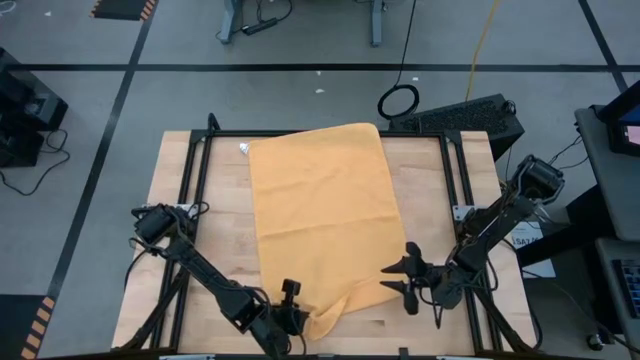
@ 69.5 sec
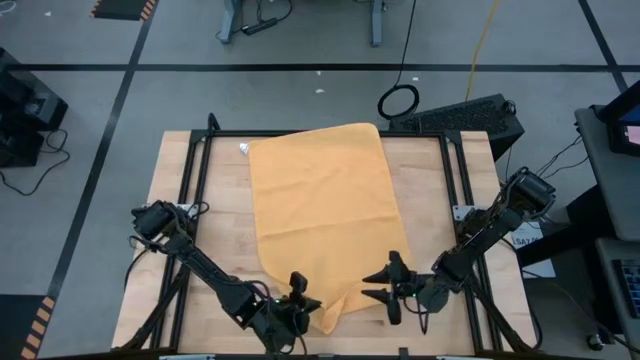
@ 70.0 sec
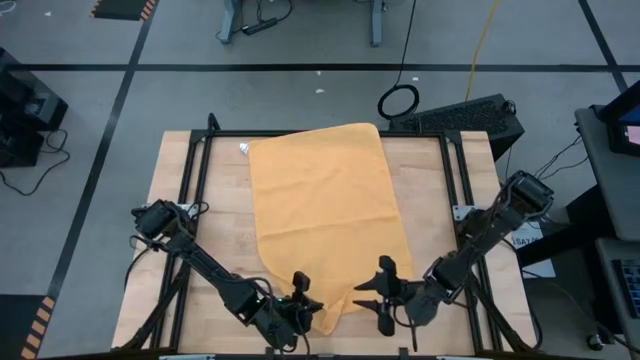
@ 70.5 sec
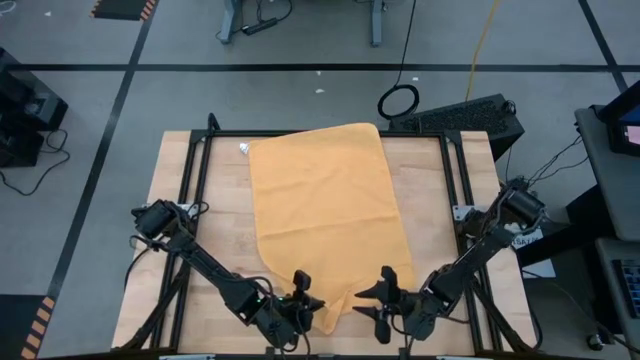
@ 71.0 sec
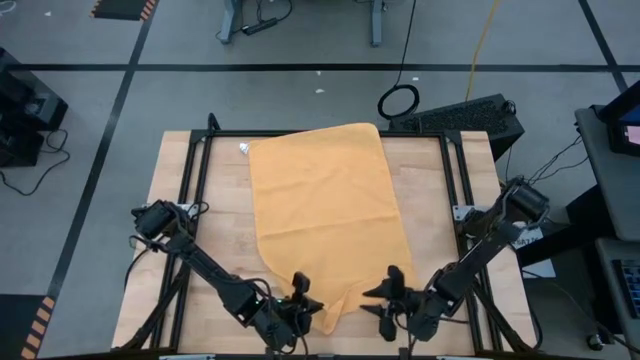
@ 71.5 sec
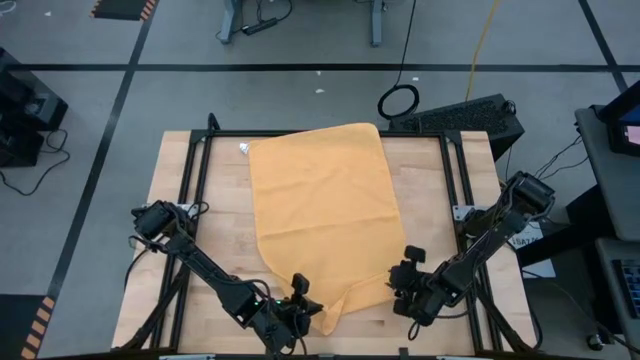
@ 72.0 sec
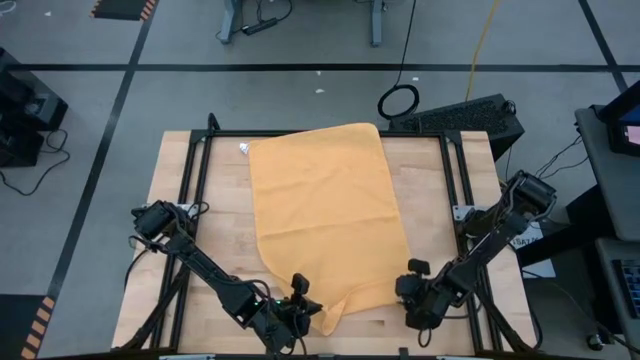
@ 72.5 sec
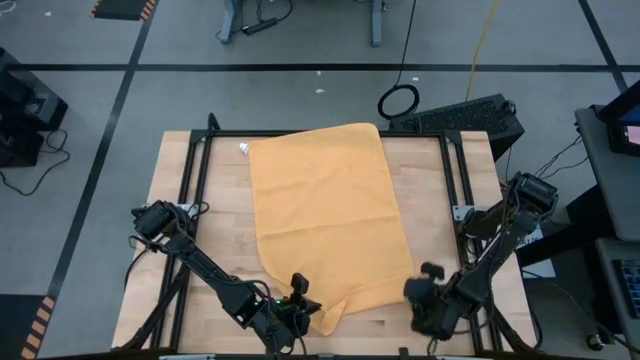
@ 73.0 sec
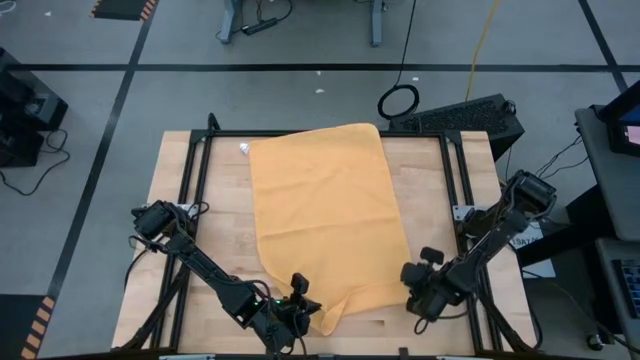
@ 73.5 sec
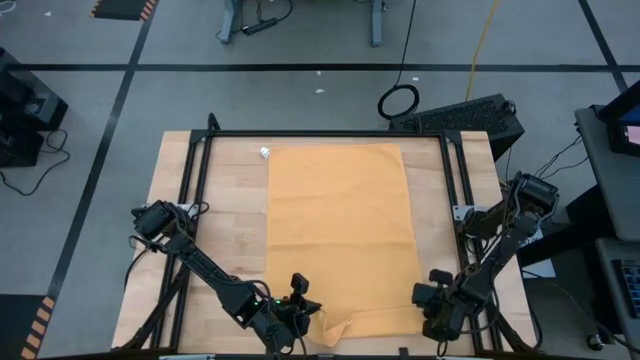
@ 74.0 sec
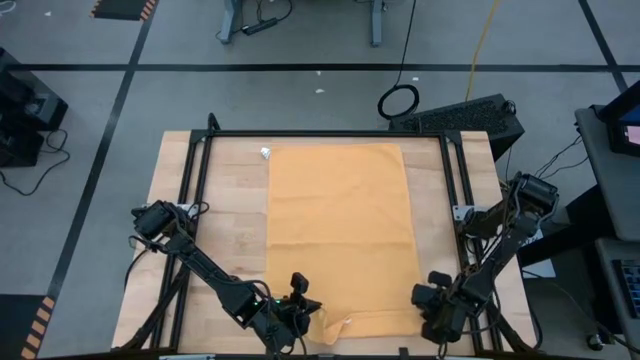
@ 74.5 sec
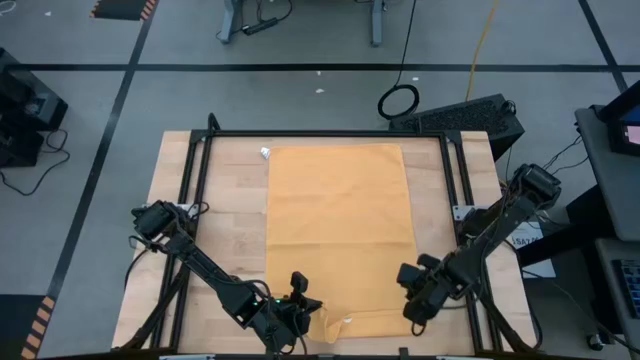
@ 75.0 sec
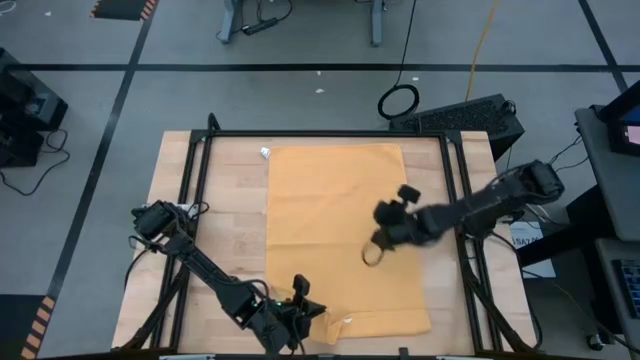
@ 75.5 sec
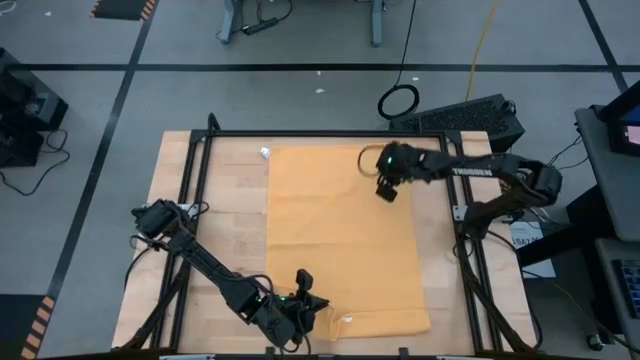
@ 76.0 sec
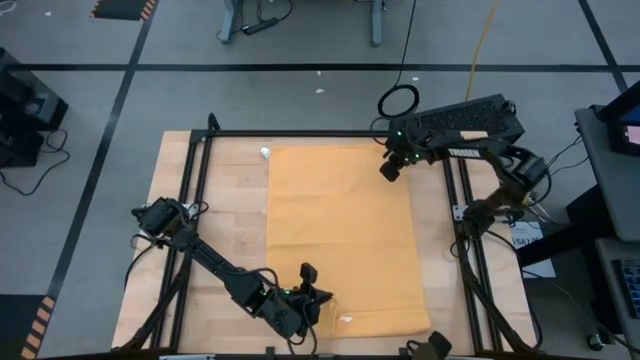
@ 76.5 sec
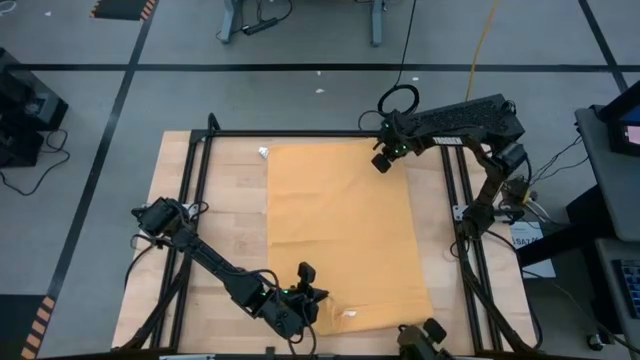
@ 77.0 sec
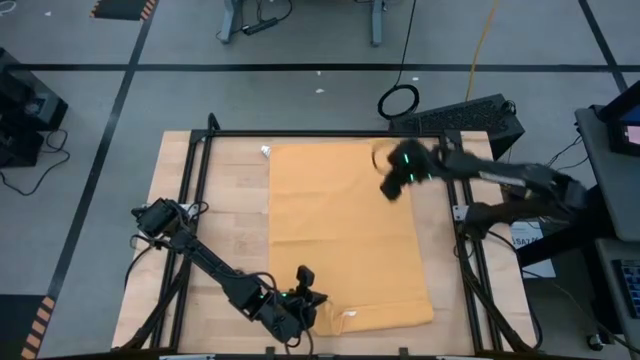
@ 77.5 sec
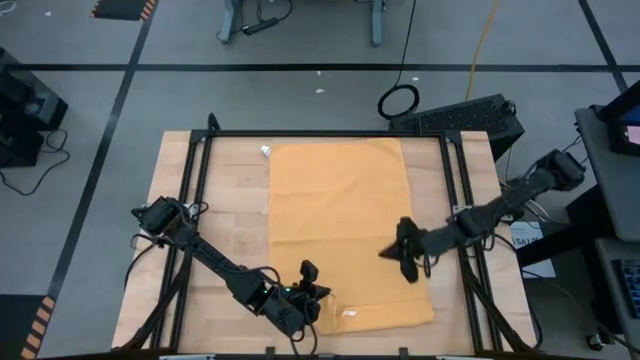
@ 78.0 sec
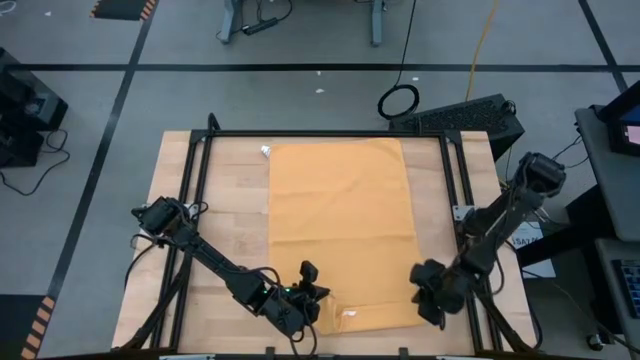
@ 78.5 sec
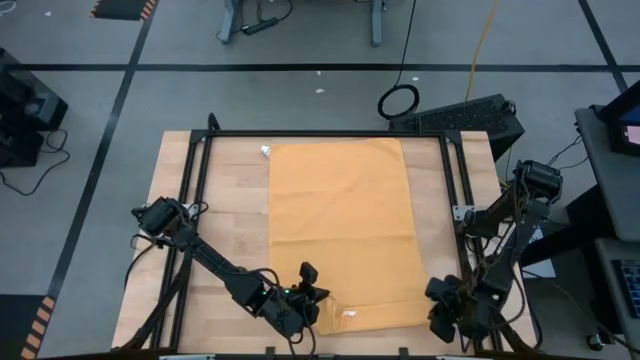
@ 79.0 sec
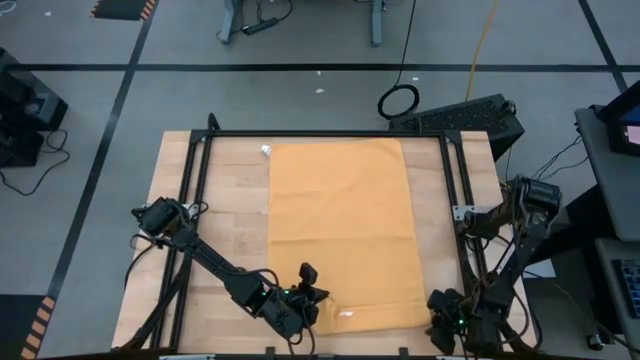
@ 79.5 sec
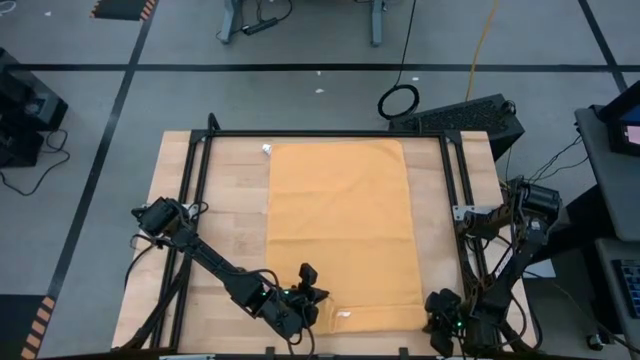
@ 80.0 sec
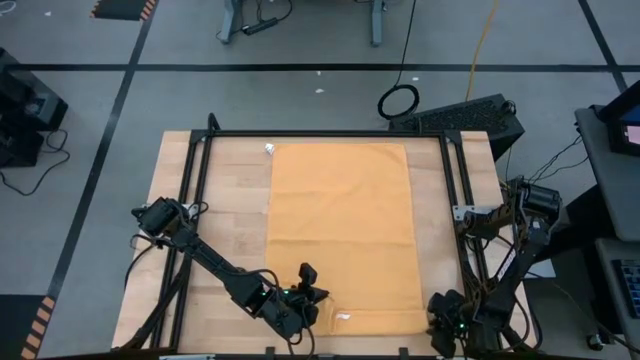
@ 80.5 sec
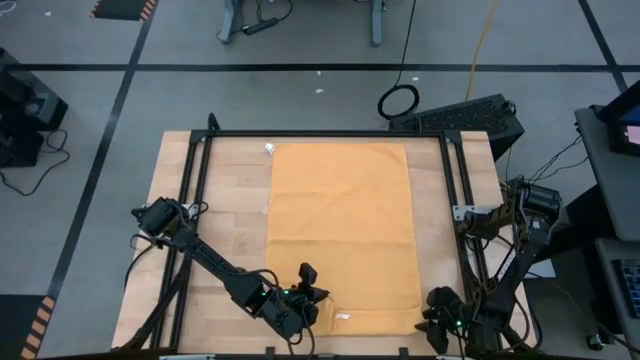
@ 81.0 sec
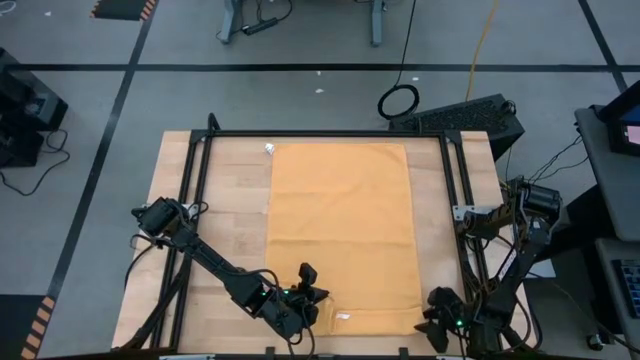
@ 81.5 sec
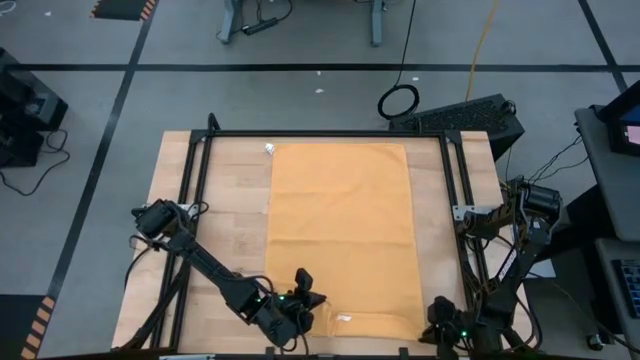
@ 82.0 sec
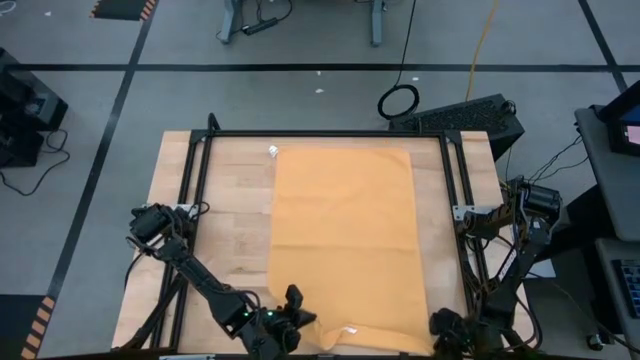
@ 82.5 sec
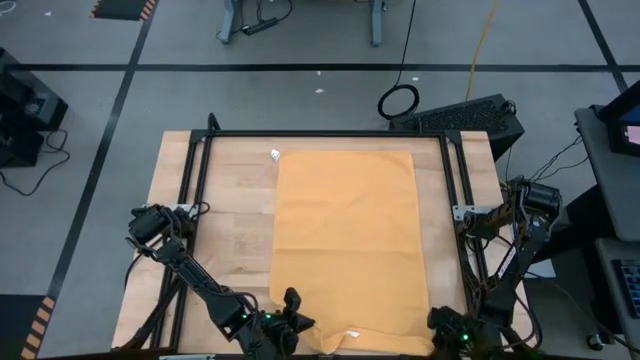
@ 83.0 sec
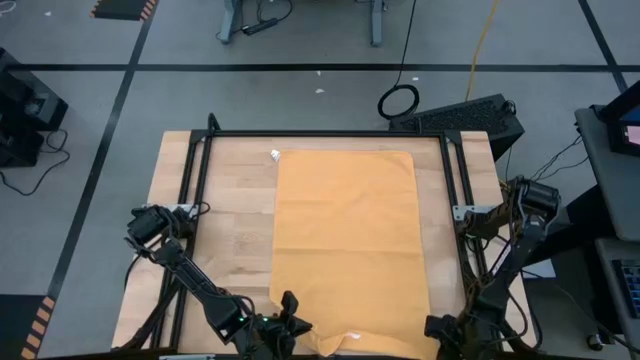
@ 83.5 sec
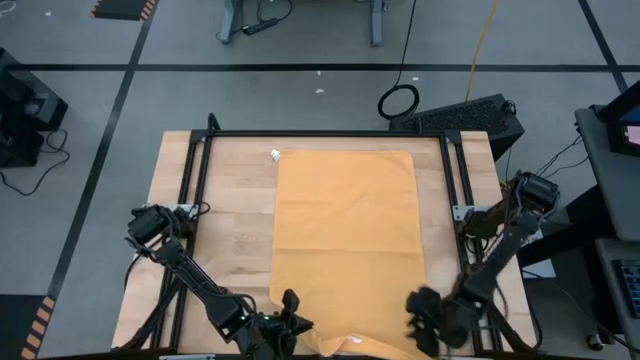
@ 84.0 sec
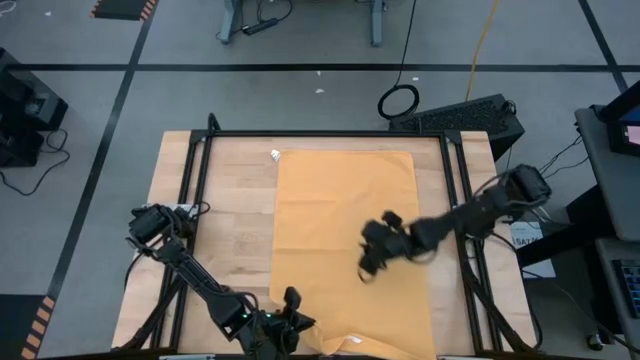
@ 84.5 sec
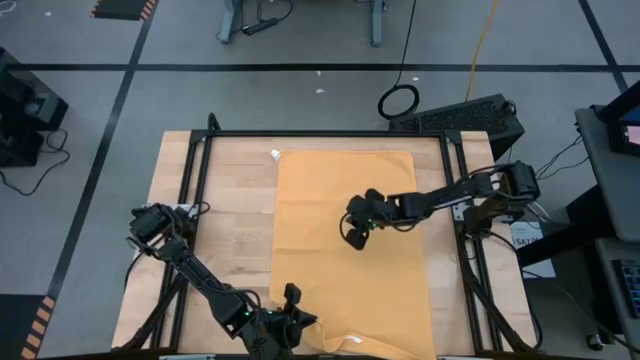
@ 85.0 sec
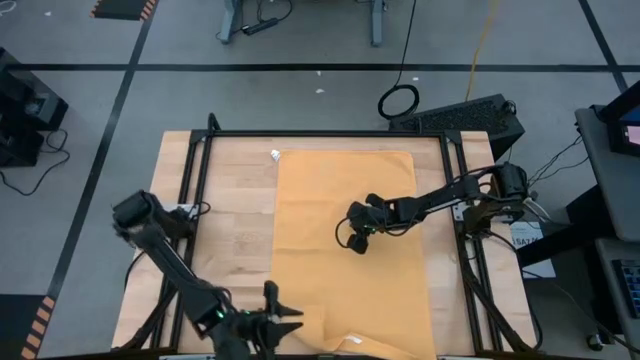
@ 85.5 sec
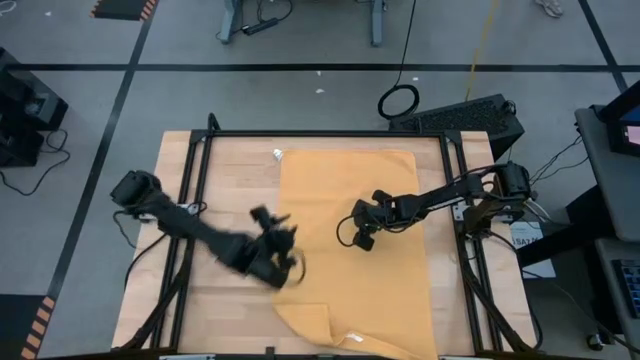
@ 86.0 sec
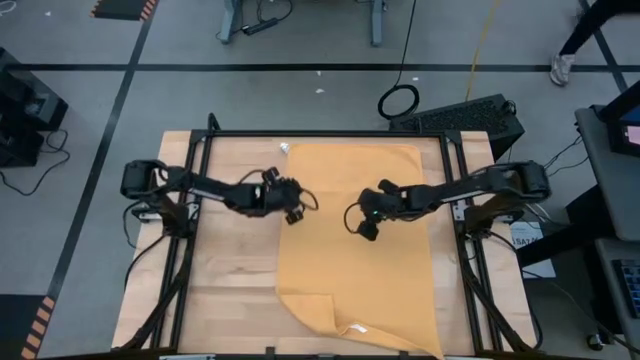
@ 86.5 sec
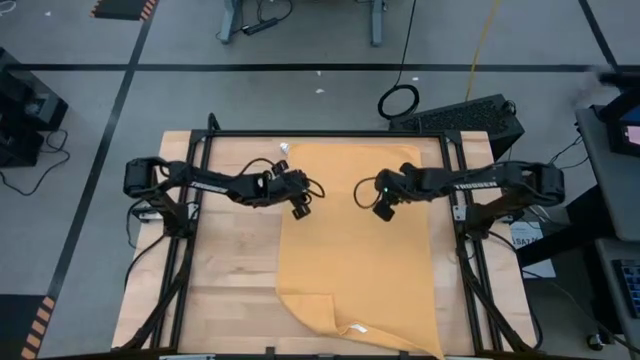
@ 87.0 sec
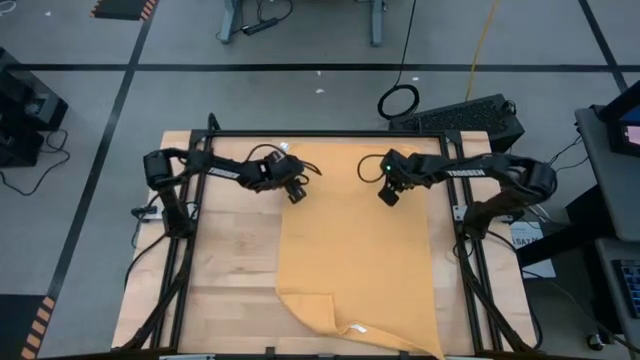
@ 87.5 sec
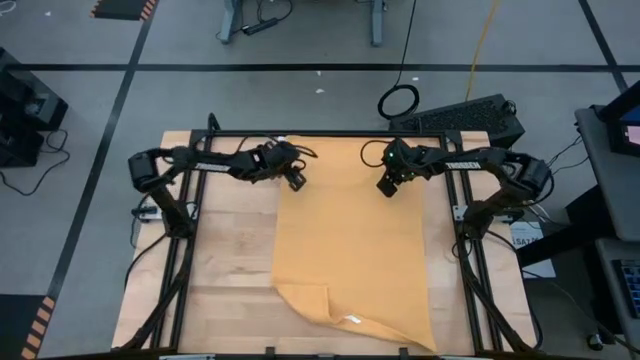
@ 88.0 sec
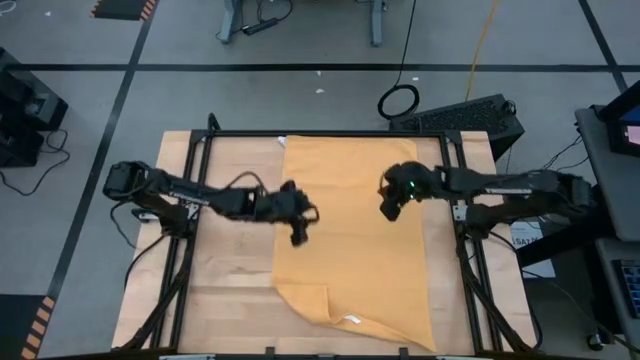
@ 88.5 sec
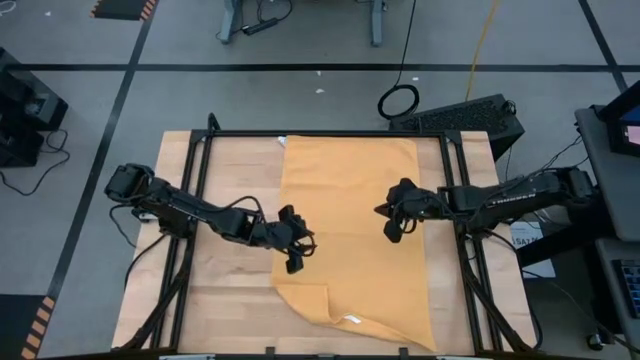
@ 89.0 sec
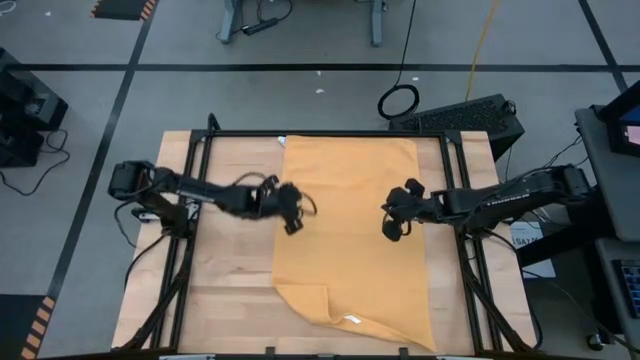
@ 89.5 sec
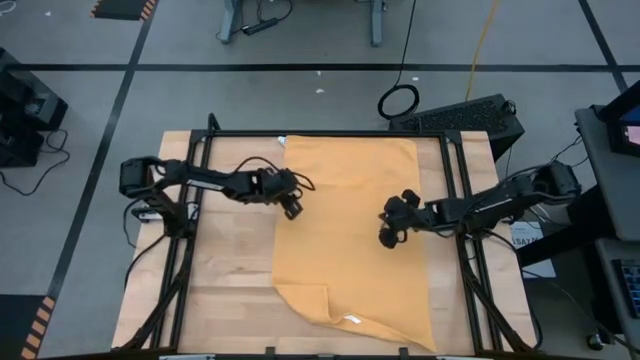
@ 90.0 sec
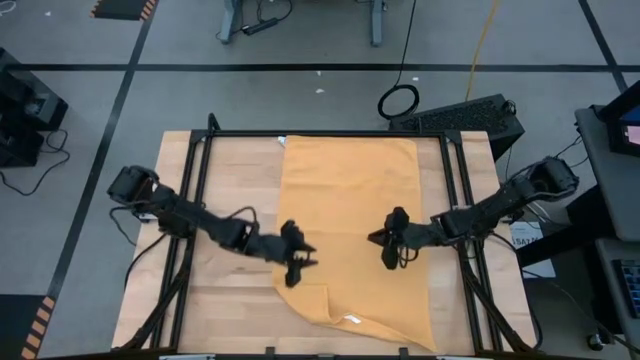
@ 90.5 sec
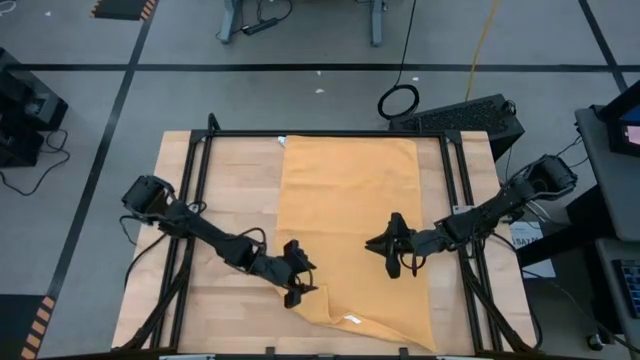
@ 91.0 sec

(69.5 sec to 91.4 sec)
Task: Roll towel
Fold the yellow towel
